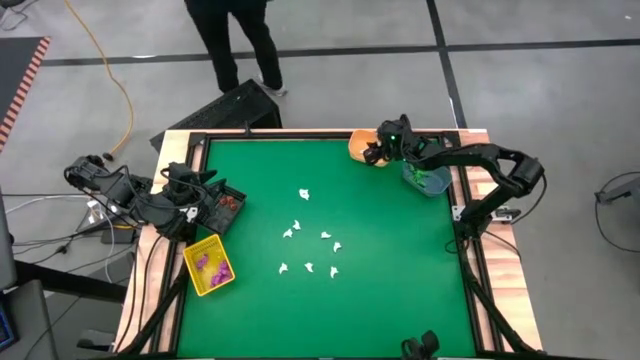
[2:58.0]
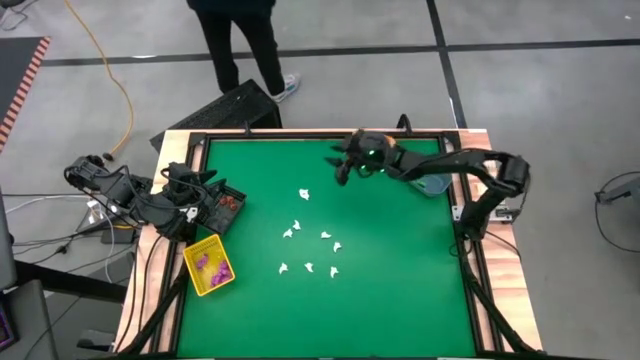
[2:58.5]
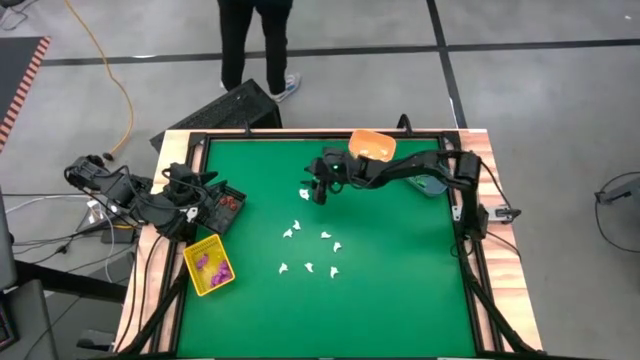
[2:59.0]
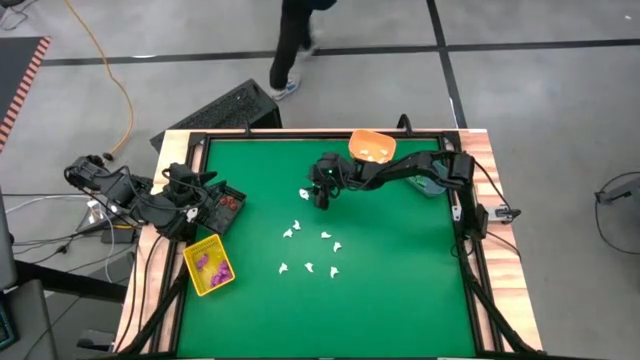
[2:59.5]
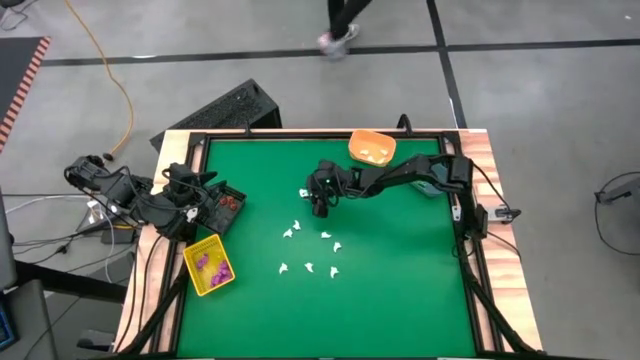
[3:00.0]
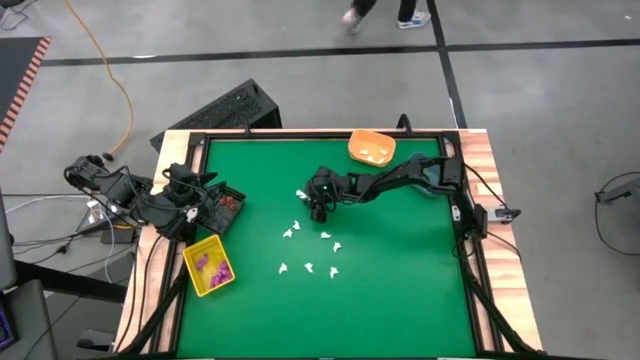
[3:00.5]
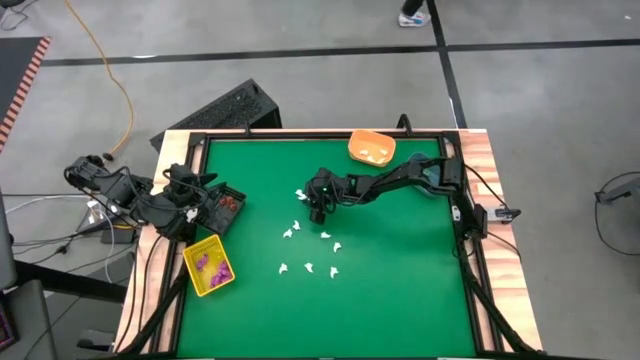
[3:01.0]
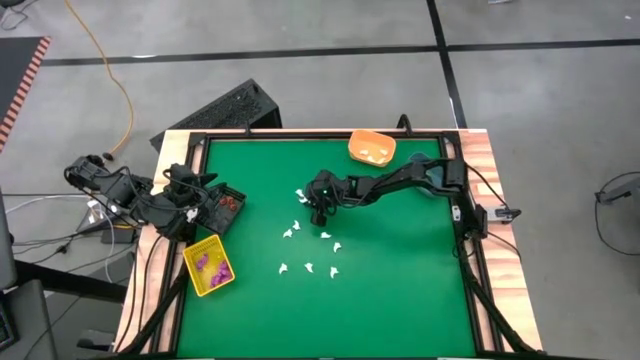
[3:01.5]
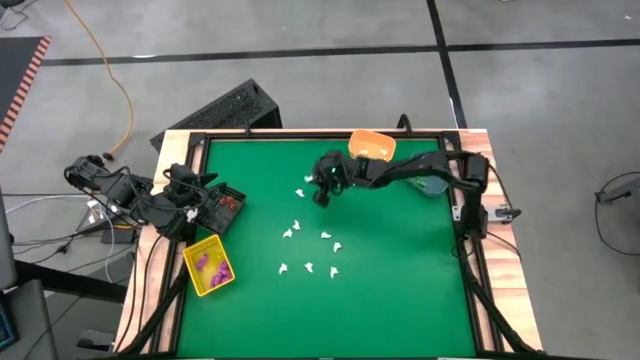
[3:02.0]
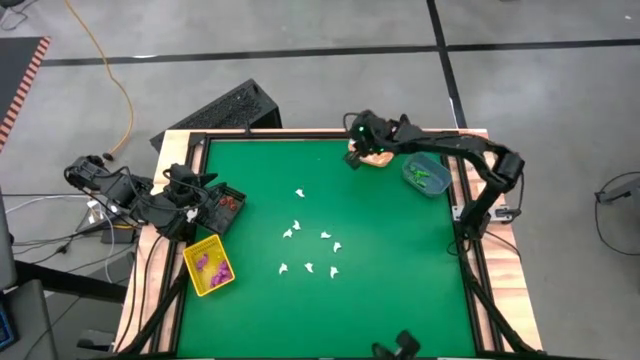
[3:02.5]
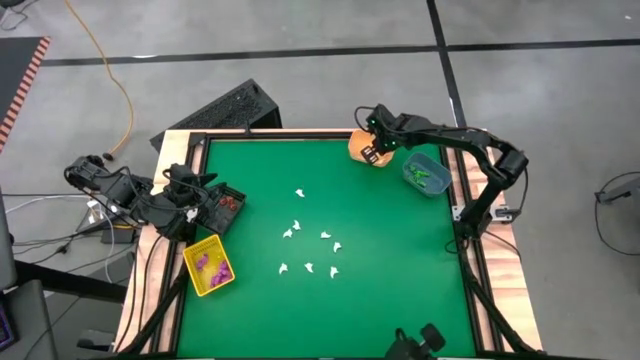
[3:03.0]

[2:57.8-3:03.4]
Task: Sort Halloween decoration
Put the white ghost toy into the light orange bin

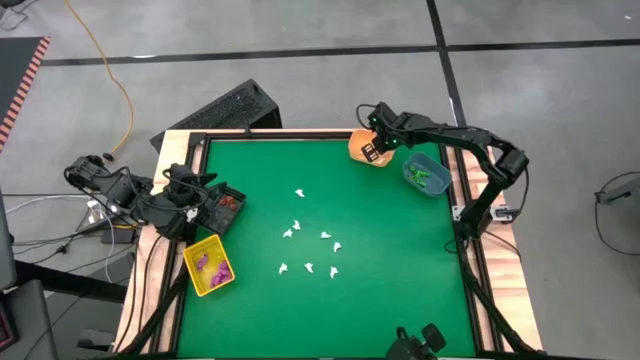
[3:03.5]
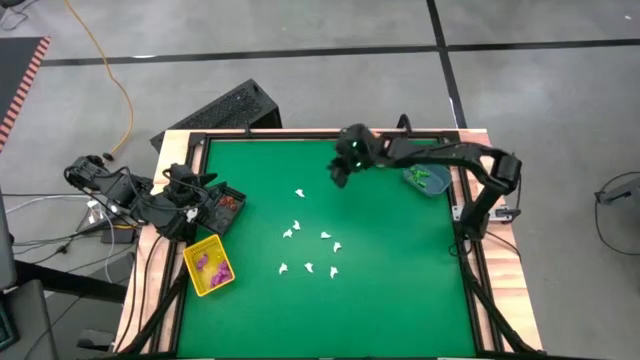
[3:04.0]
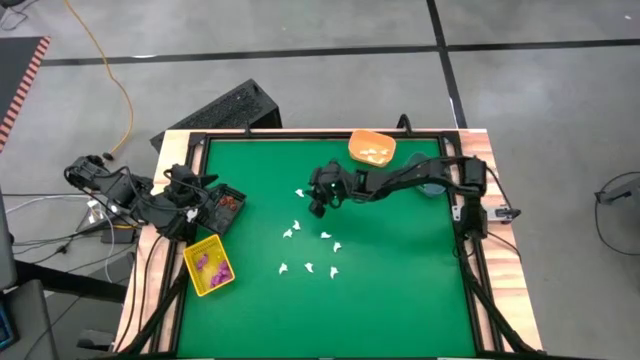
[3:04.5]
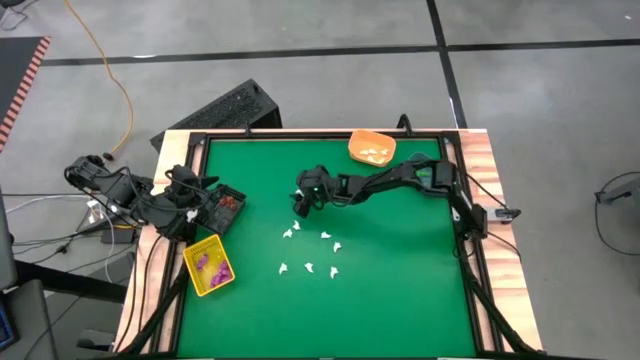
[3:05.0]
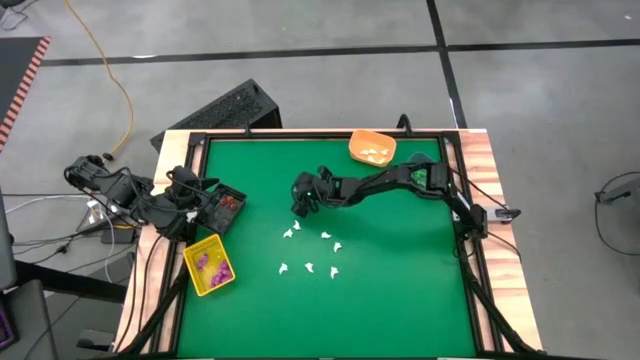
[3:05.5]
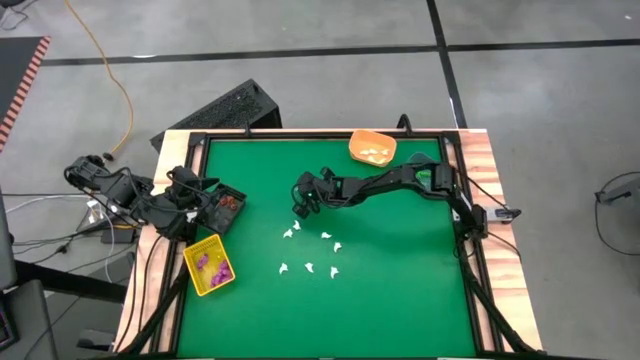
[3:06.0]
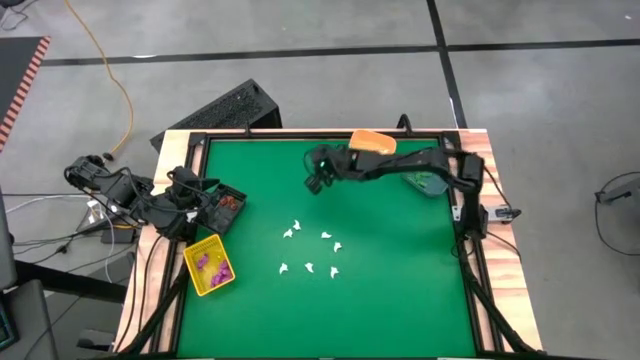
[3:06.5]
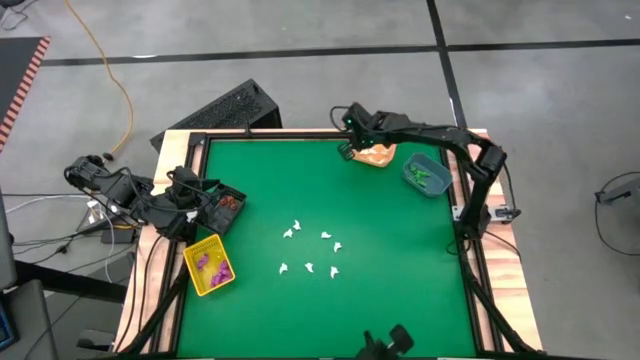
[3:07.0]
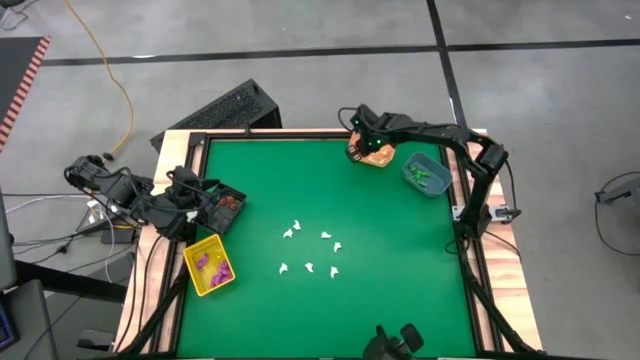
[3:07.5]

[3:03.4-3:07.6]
Put the white ghost toy into the light orange bin

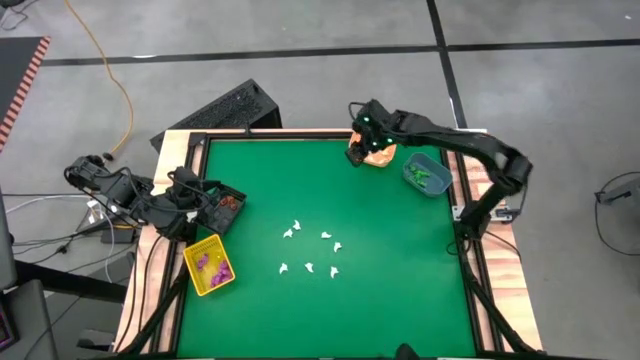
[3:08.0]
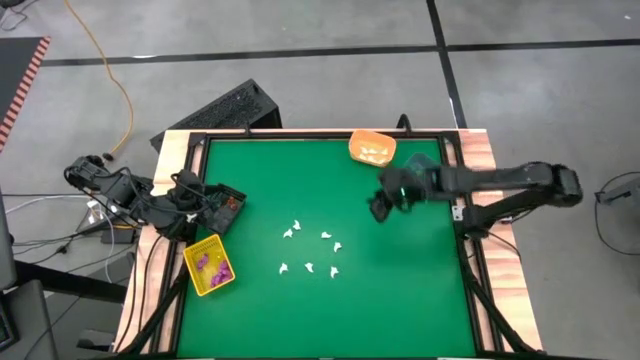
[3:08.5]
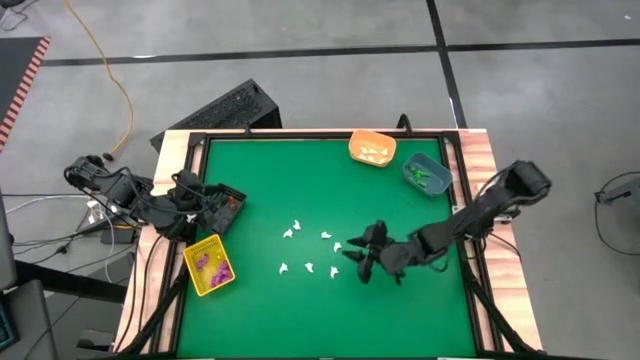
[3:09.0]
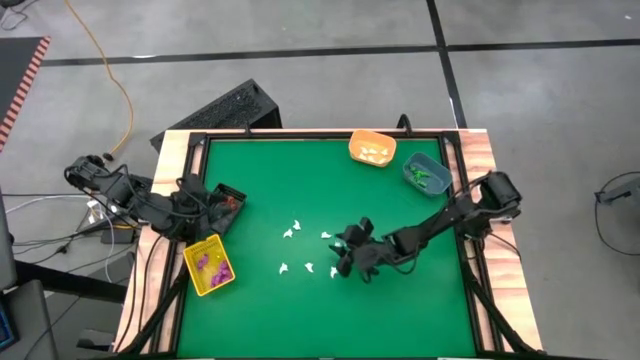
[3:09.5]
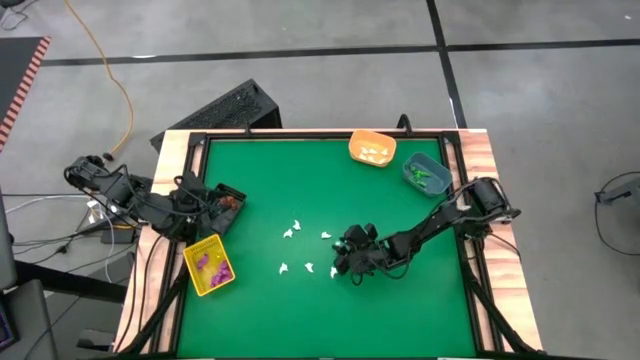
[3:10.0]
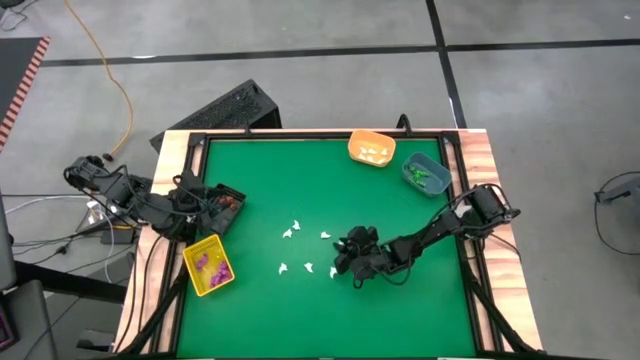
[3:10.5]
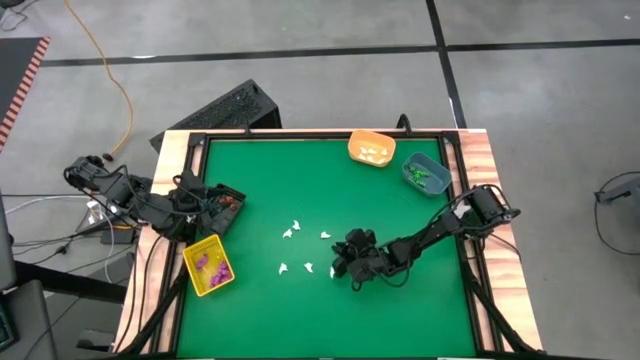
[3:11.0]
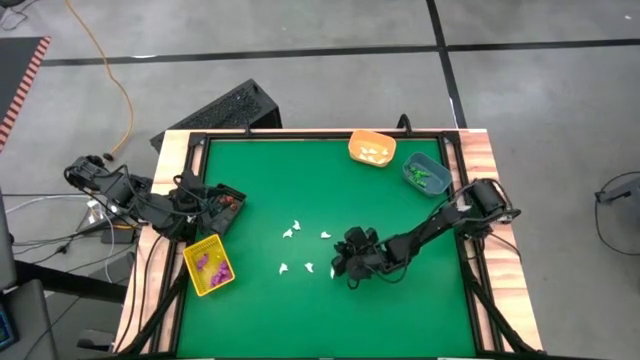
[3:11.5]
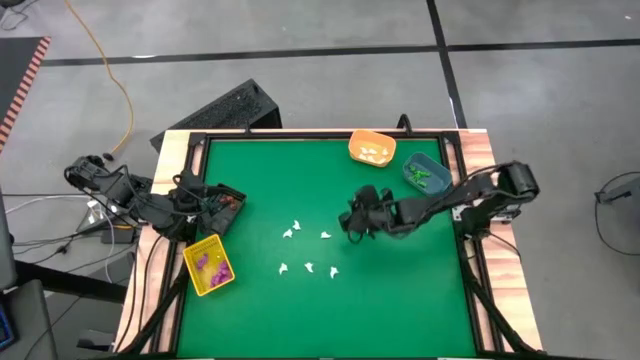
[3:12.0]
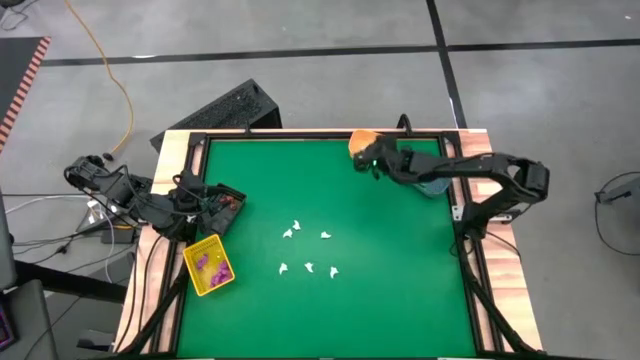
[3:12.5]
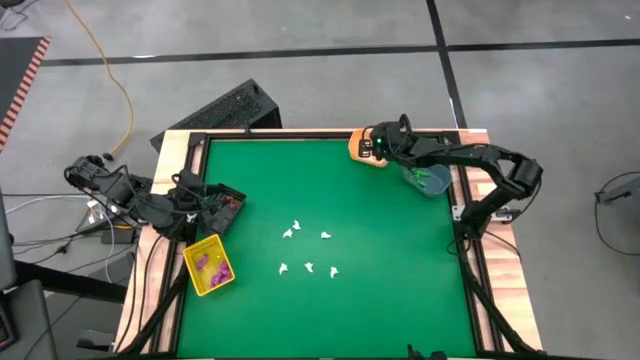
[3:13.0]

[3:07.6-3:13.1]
Put the white ghost toy into the light orange bin

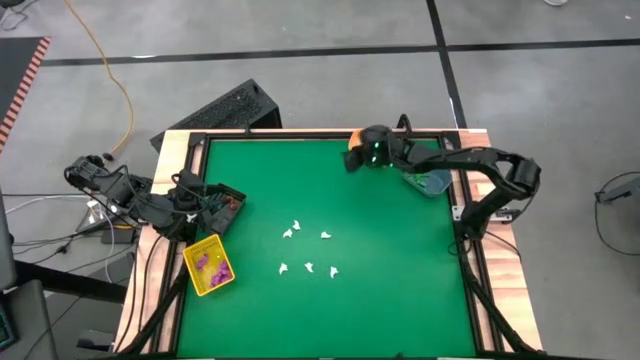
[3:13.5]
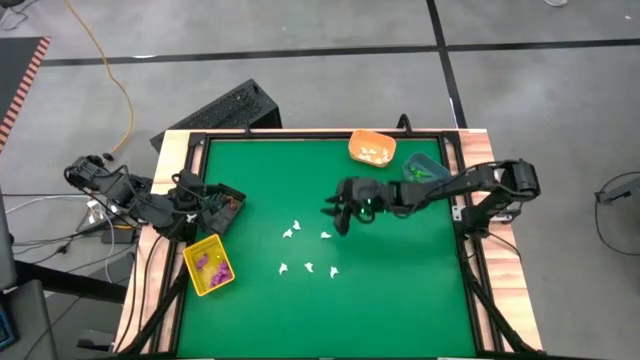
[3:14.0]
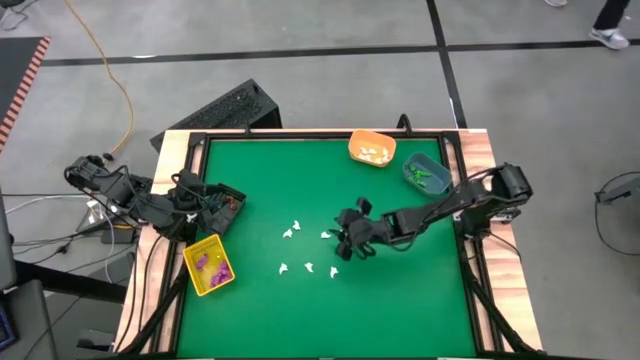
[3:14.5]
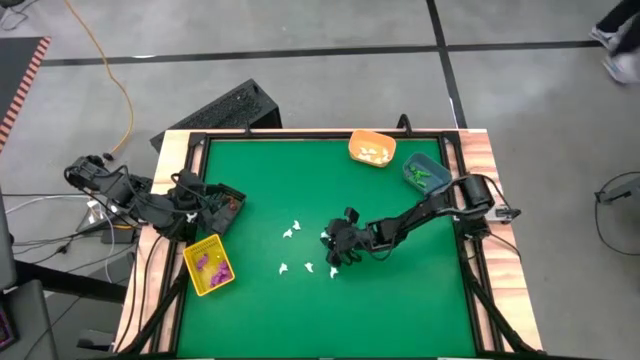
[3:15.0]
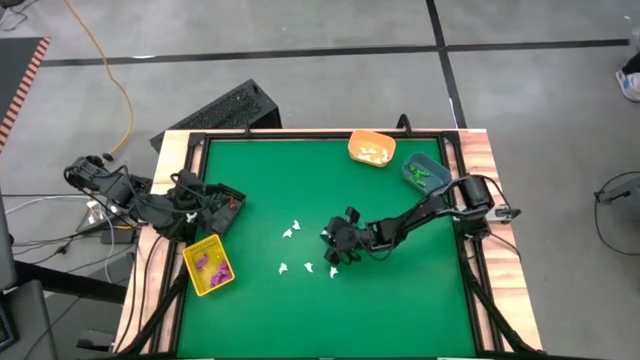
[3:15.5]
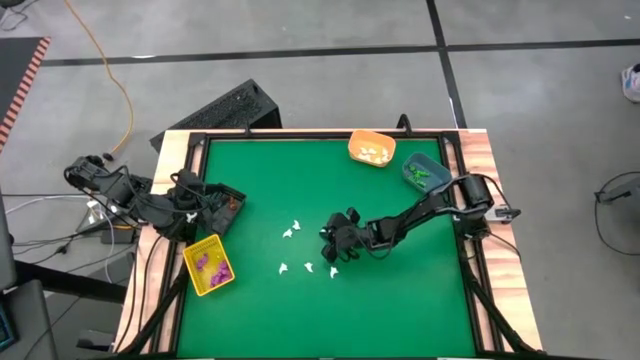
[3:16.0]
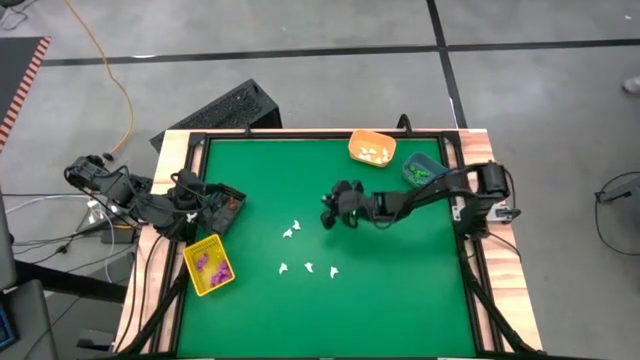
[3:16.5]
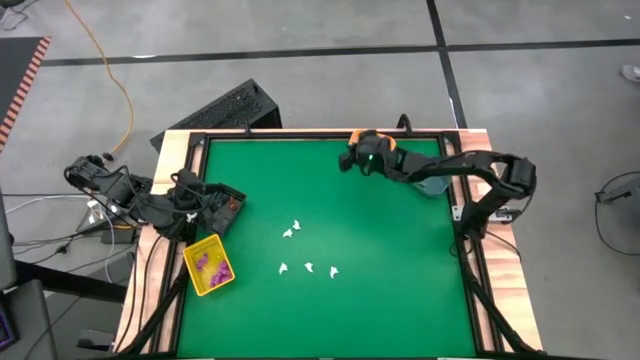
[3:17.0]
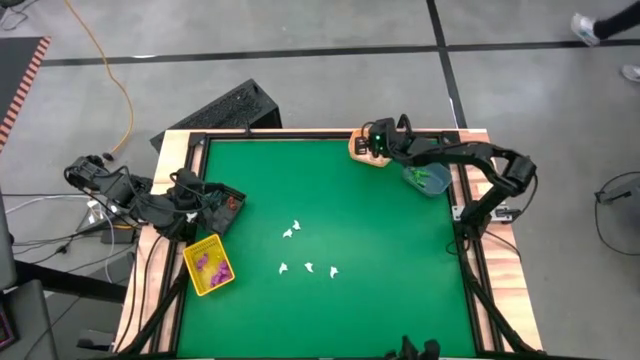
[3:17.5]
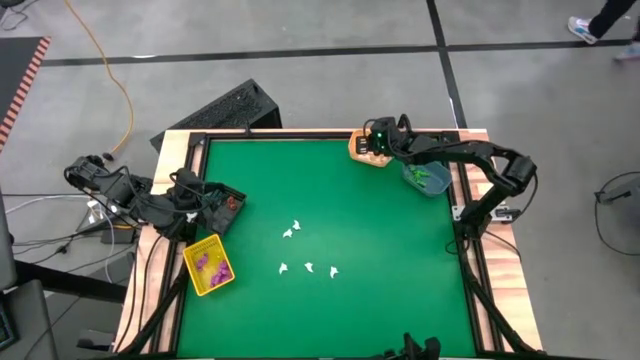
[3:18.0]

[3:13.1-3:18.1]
Put the white ghost toy into the light orange bin
